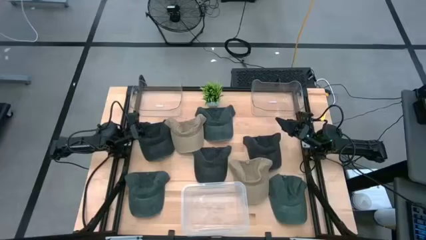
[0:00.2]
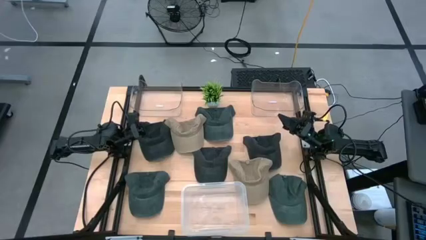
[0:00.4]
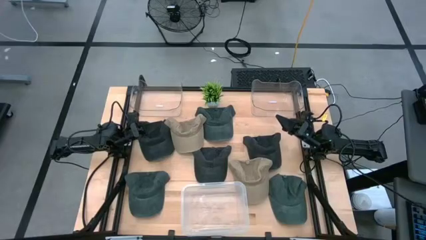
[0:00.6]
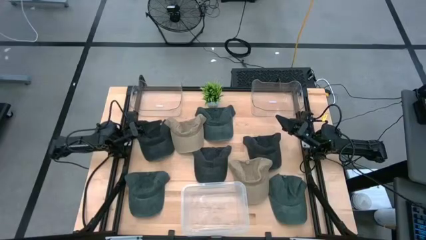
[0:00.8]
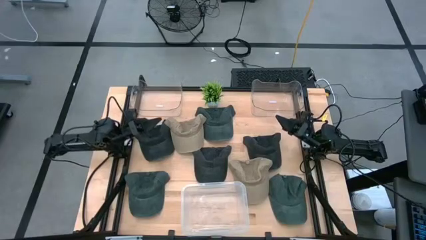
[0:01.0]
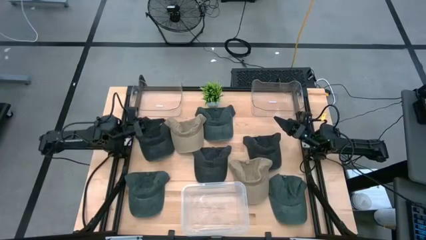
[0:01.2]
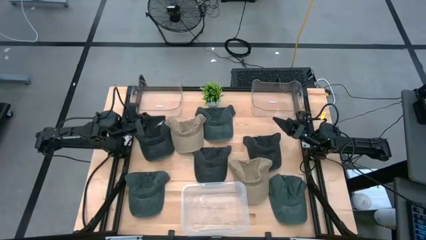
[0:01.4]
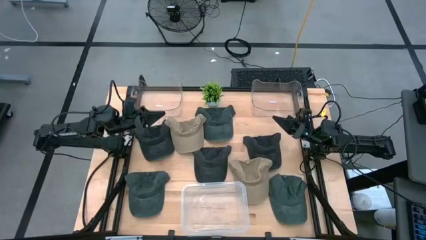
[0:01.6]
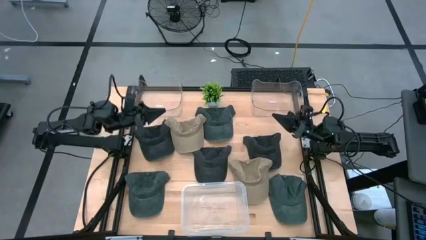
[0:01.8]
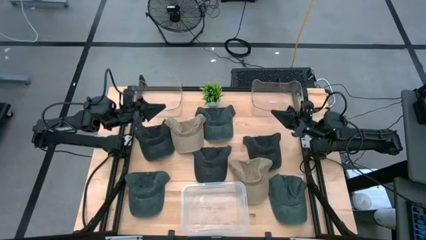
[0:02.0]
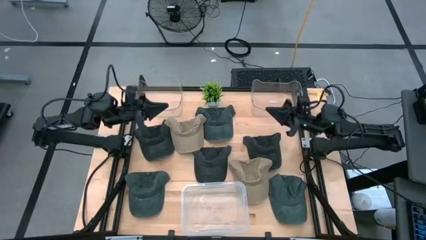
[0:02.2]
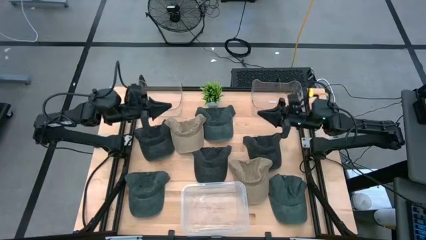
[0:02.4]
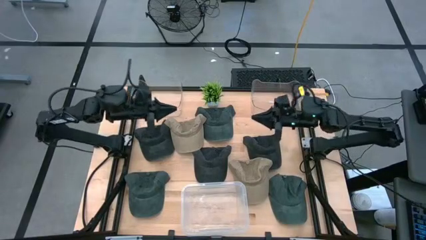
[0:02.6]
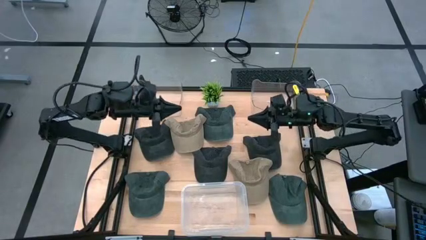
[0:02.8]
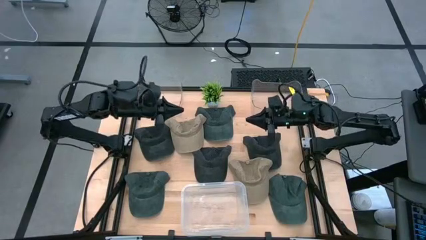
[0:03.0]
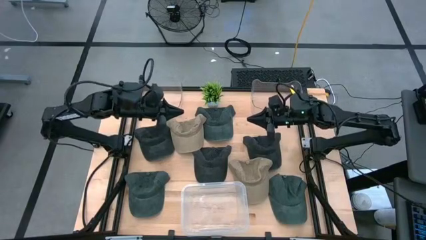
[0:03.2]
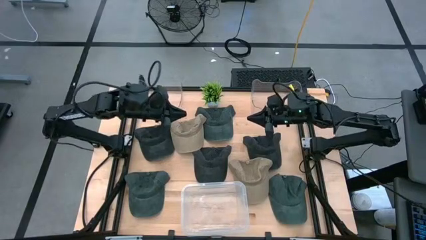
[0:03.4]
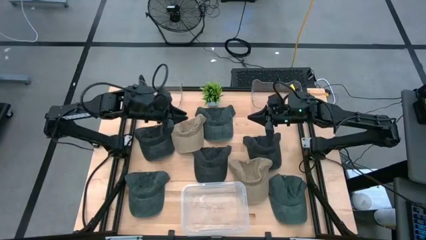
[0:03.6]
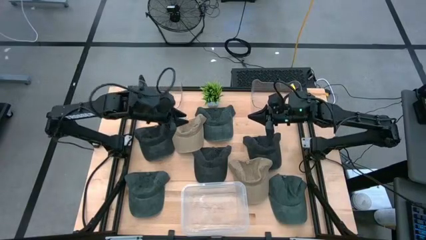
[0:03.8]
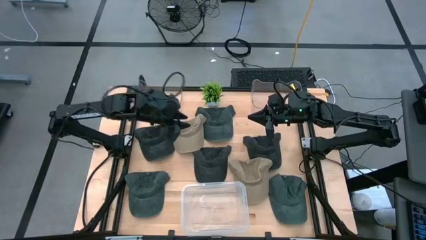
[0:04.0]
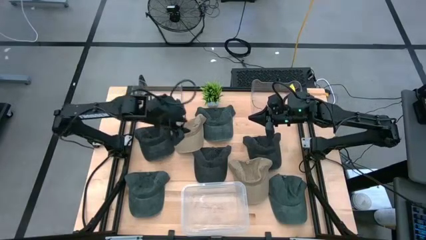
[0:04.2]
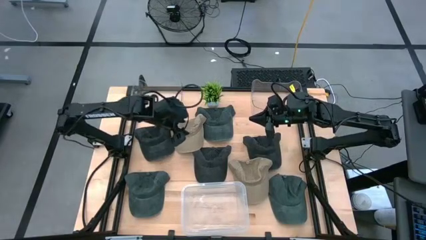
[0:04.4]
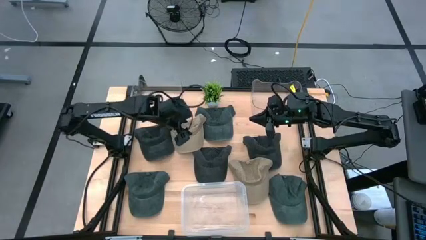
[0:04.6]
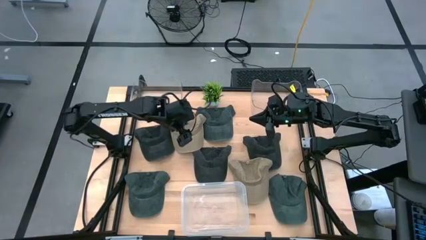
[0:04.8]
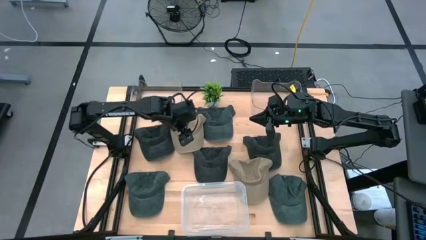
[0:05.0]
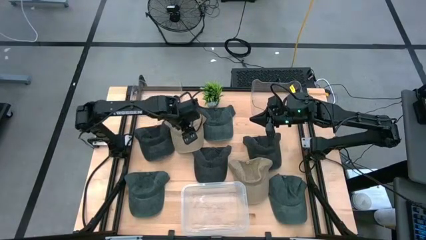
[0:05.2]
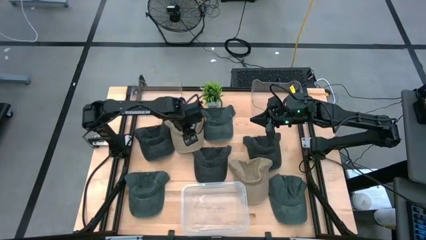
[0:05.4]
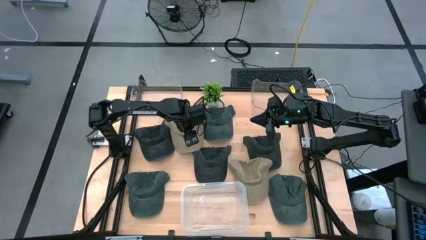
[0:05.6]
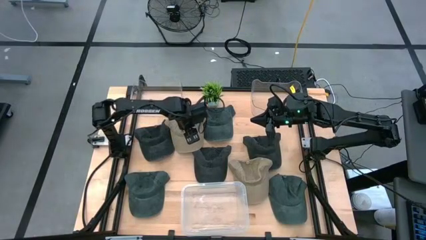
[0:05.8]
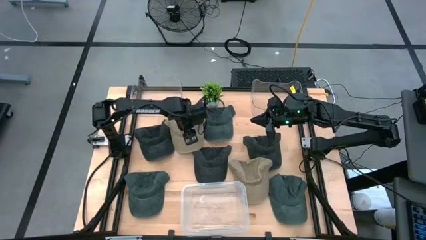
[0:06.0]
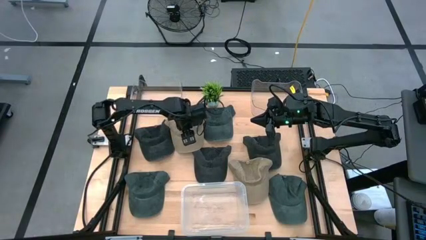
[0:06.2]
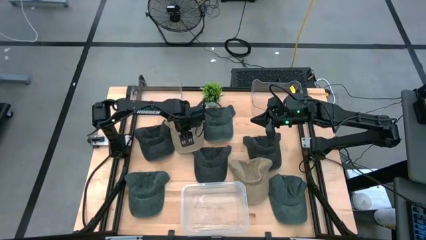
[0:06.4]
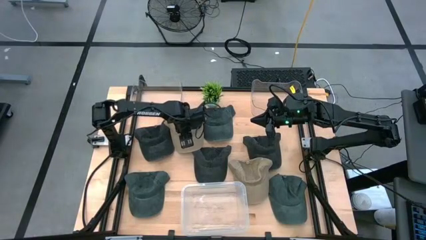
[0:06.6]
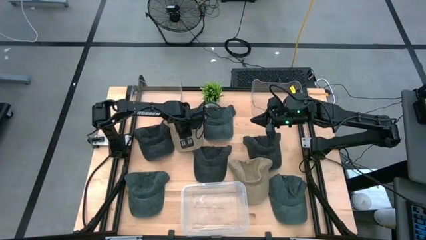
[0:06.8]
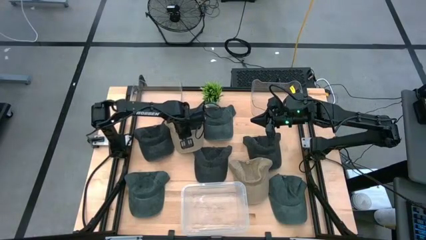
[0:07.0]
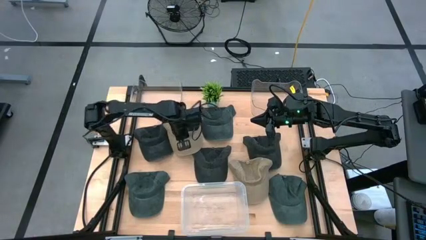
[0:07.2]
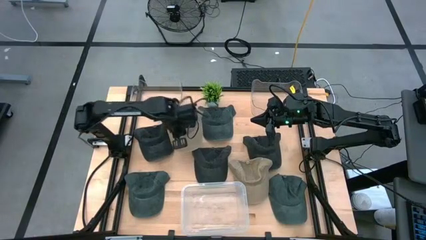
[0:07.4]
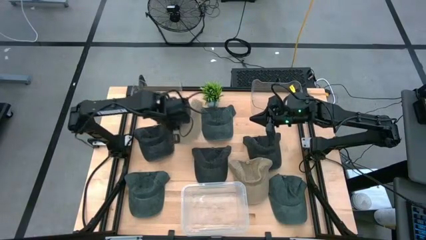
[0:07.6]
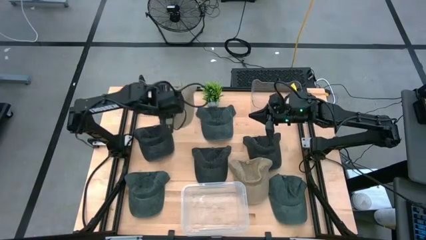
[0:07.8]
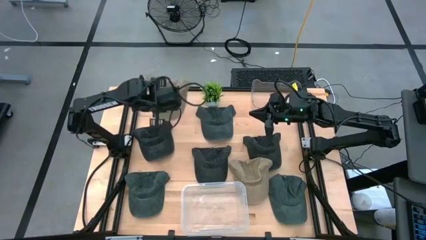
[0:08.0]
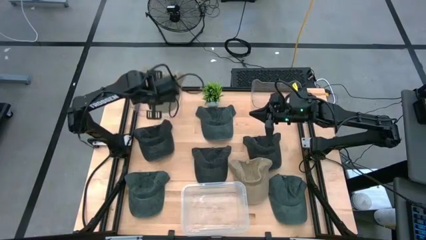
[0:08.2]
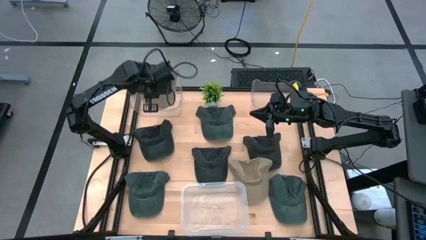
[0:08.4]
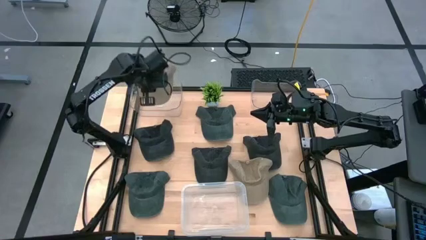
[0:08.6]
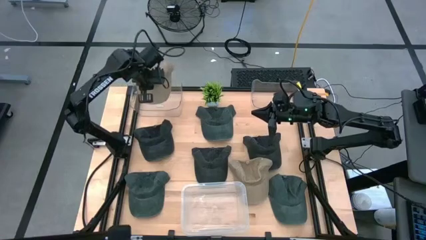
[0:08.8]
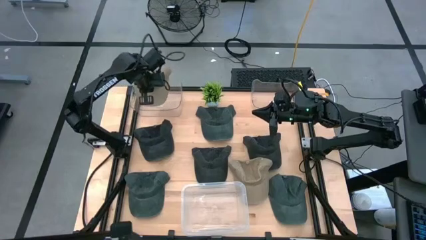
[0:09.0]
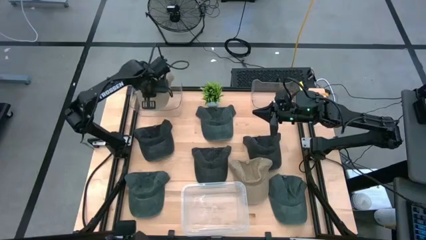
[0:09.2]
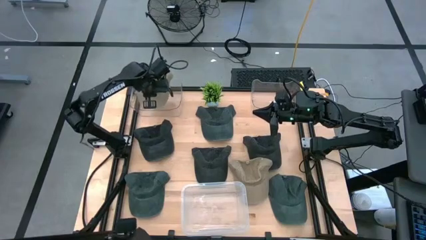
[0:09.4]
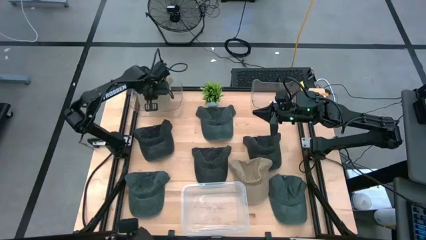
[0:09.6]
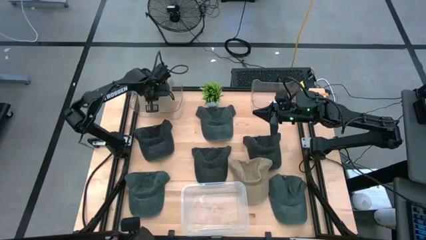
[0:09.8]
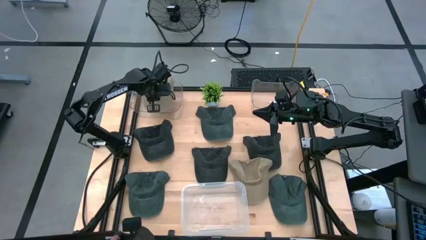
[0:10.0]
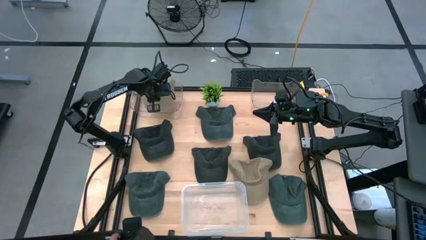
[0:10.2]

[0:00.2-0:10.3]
Task: Pick & Place hat
Put the top light brown cap into the left transparent bin

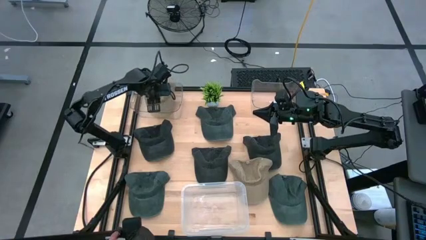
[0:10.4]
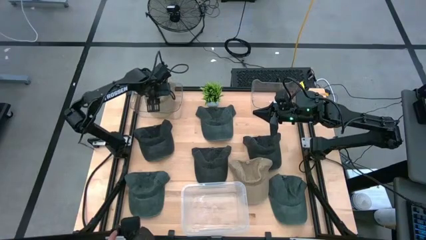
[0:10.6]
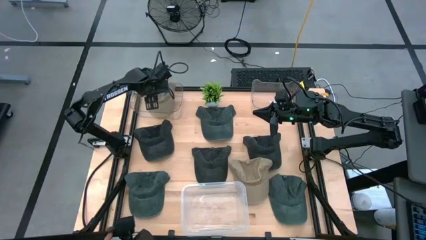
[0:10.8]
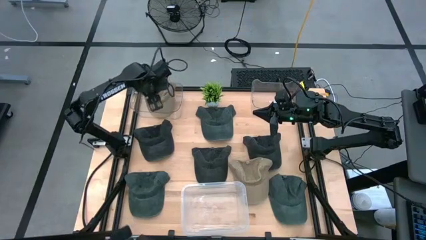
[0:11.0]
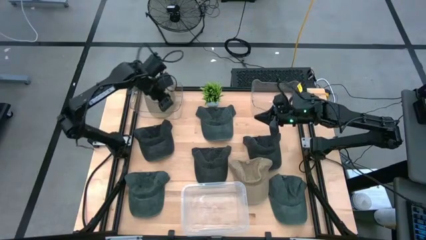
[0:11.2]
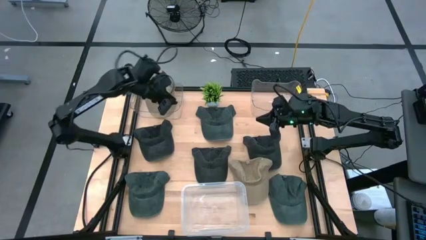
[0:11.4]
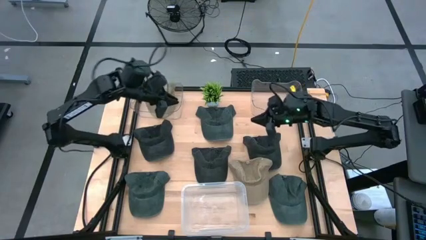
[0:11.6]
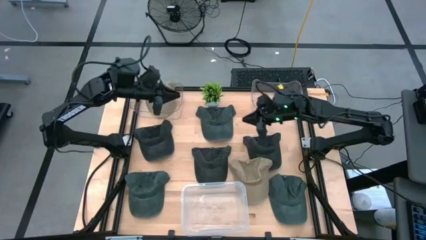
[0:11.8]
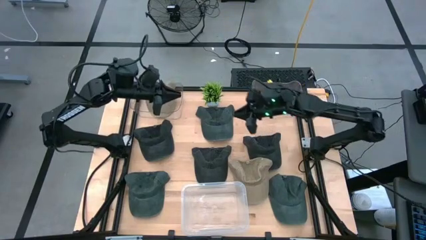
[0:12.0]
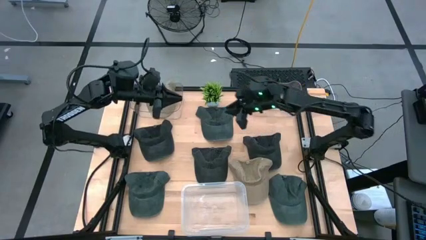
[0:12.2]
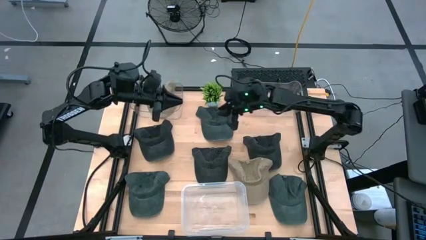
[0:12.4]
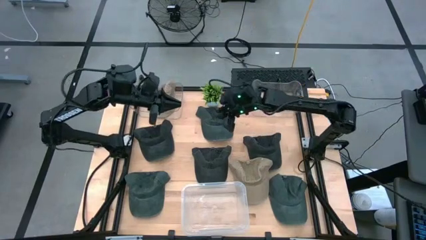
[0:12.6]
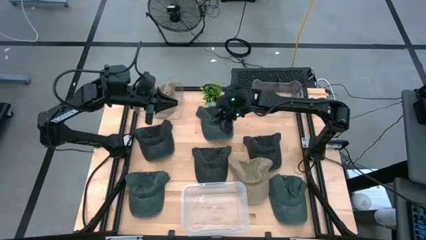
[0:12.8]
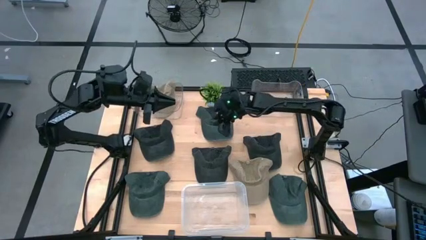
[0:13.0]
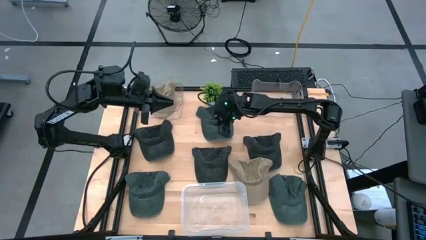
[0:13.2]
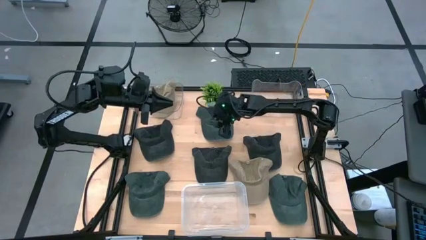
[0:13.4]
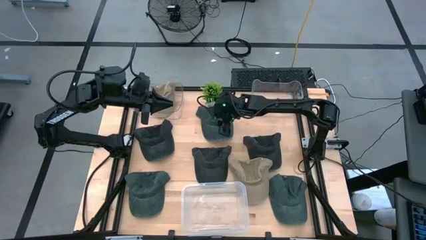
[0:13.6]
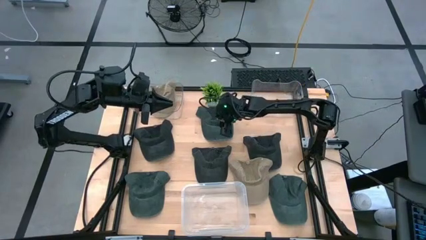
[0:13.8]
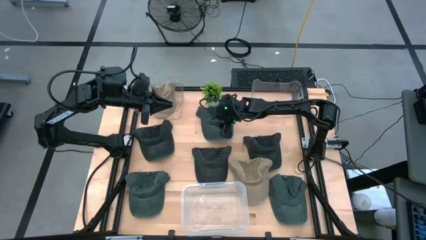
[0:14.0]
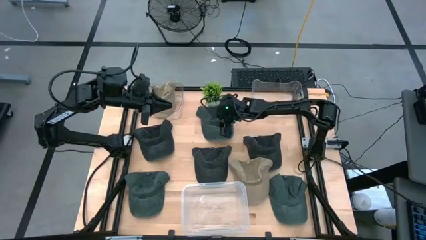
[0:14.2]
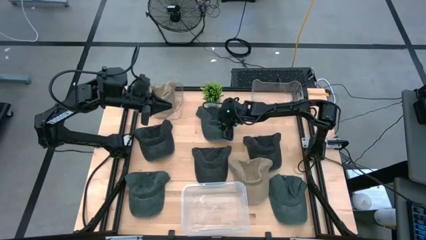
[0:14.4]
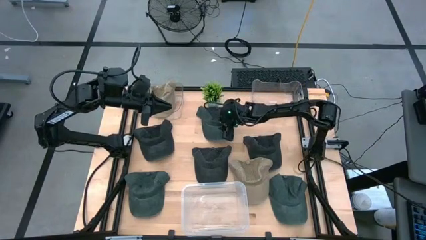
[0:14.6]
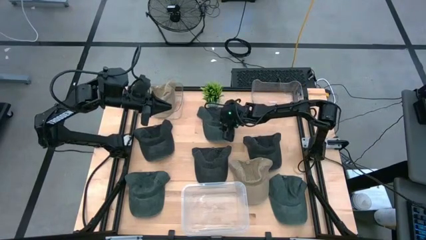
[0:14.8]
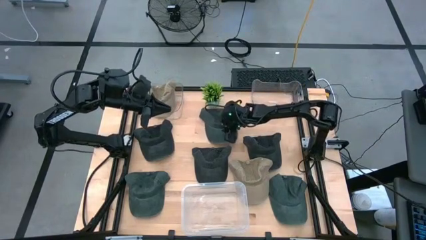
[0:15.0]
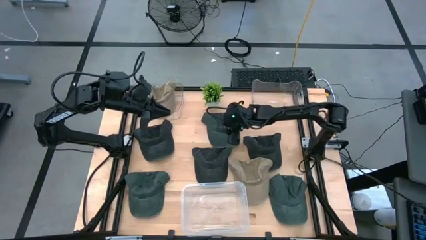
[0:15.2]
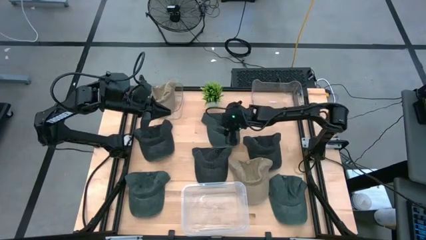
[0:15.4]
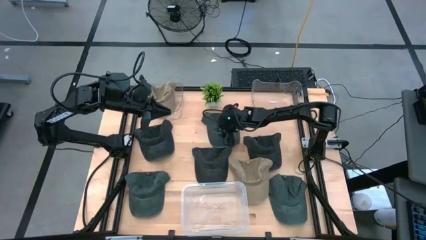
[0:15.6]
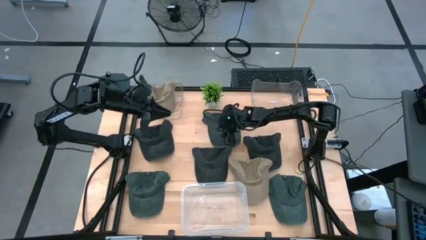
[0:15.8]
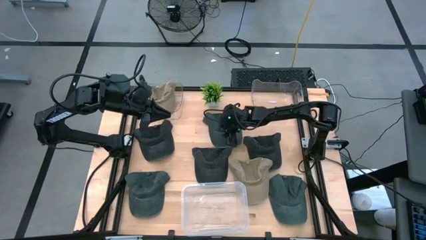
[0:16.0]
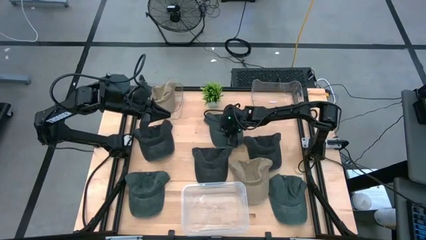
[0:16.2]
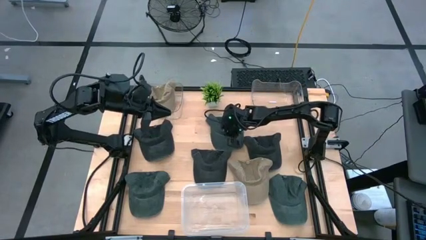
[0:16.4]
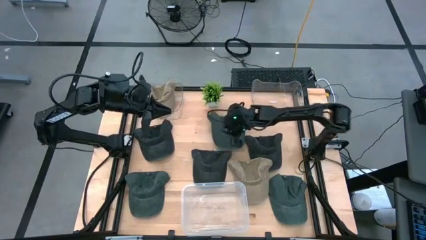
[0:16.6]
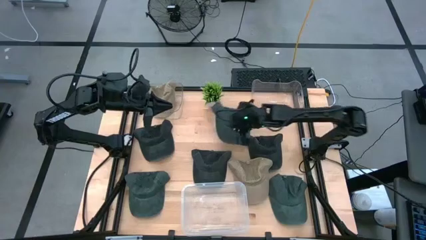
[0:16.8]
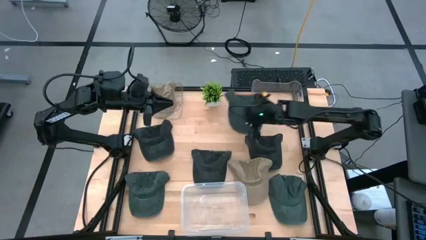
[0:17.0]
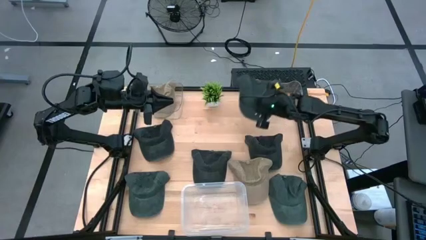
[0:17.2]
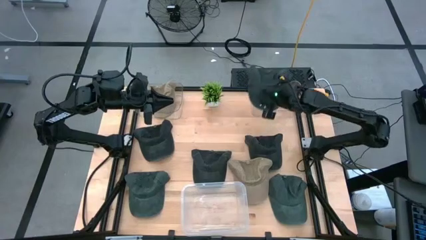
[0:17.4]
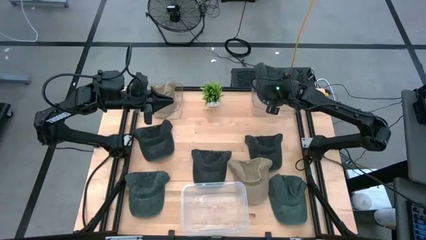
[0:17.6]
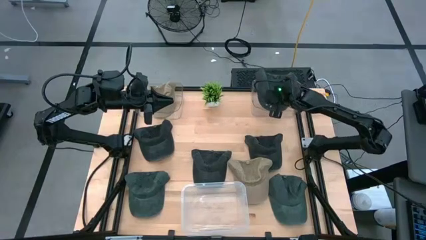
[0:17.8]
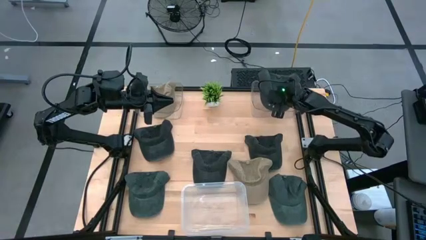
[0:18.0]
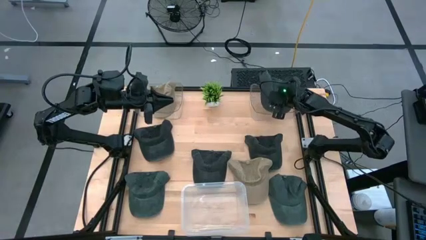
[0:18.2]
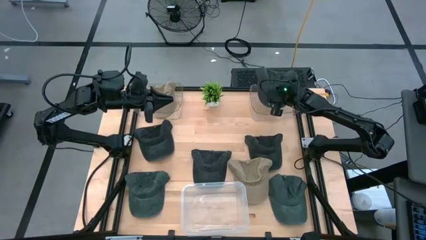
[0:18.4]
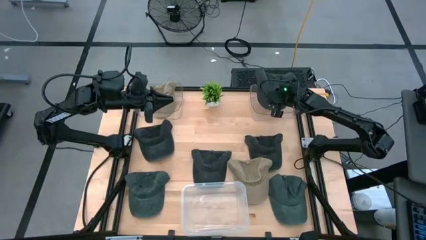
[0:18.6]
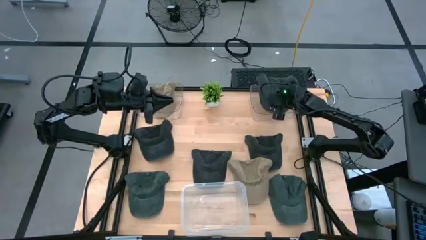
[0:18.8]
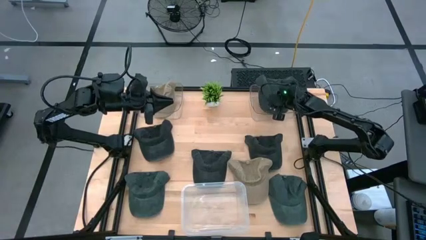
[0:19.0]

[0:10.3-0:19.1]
Put the top dark gray cap into the right transparent bin
